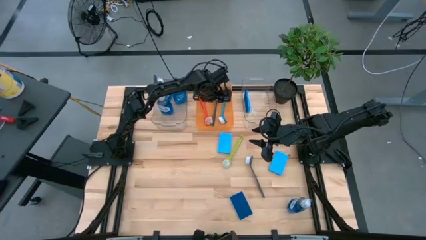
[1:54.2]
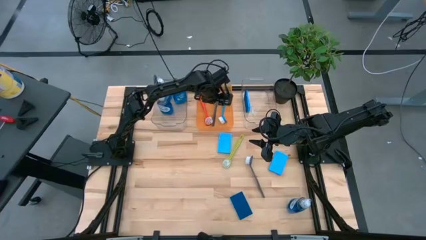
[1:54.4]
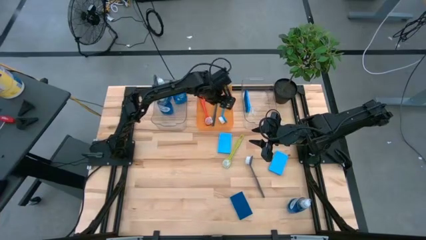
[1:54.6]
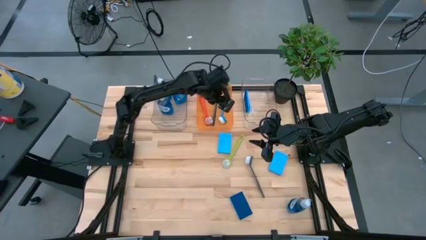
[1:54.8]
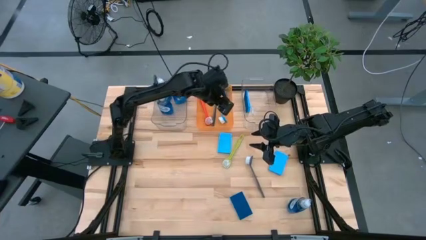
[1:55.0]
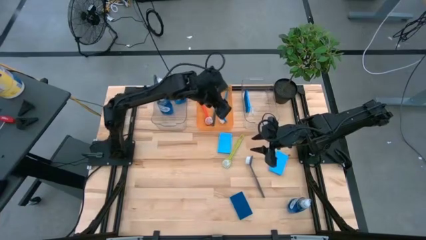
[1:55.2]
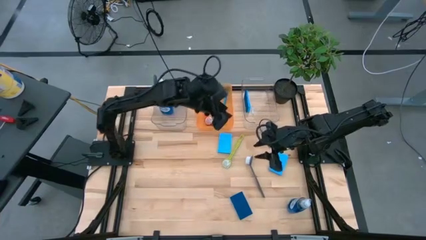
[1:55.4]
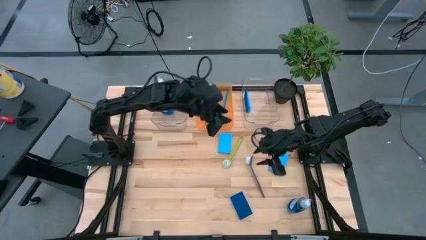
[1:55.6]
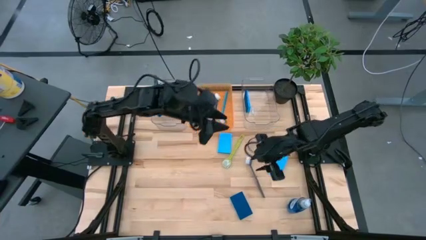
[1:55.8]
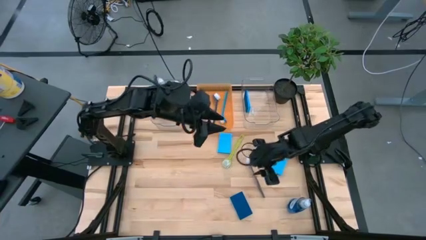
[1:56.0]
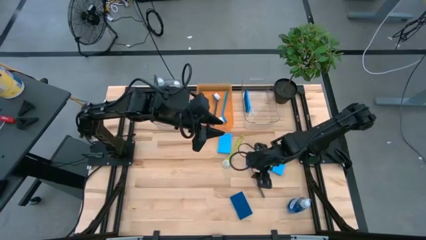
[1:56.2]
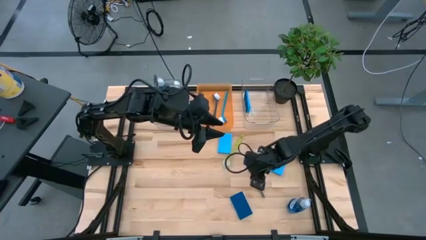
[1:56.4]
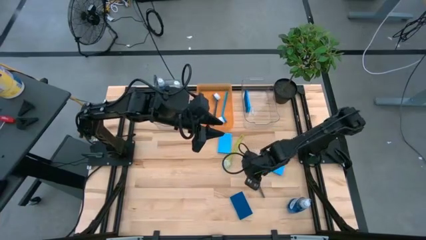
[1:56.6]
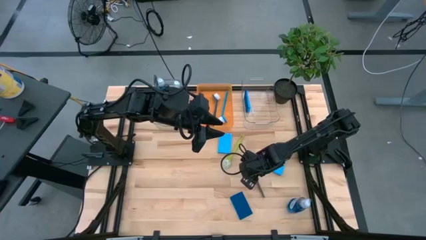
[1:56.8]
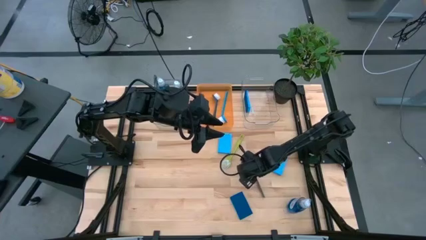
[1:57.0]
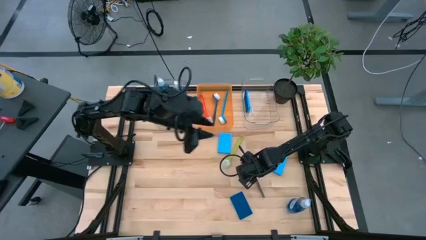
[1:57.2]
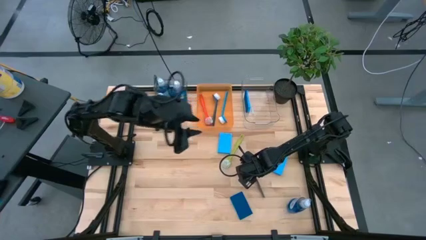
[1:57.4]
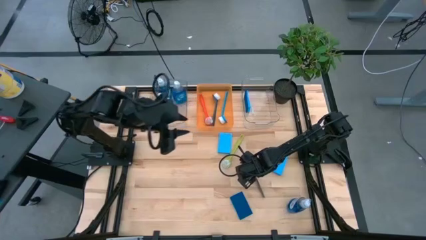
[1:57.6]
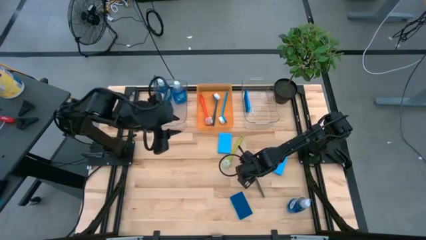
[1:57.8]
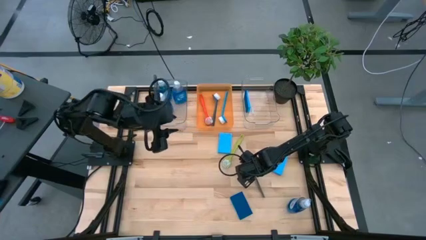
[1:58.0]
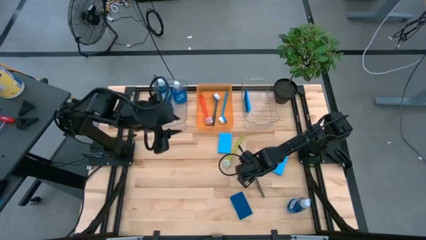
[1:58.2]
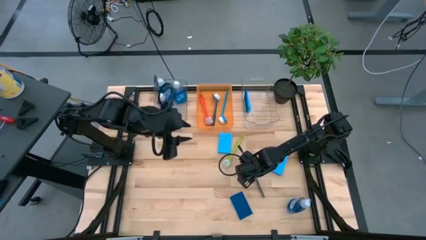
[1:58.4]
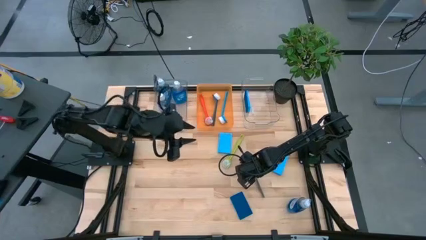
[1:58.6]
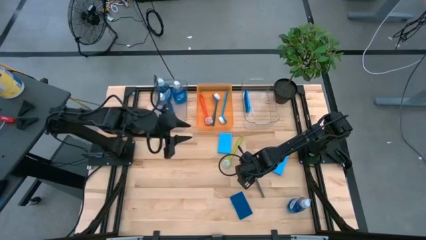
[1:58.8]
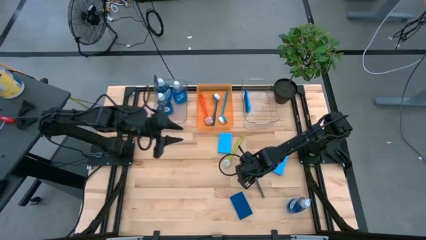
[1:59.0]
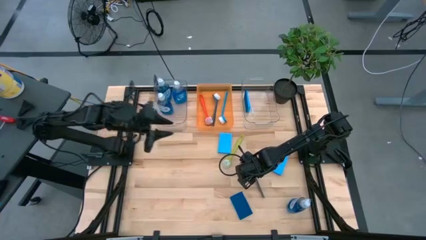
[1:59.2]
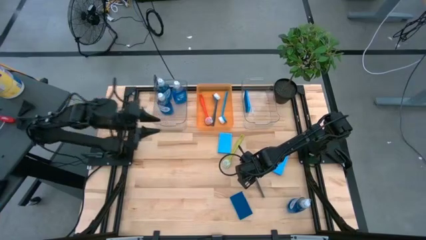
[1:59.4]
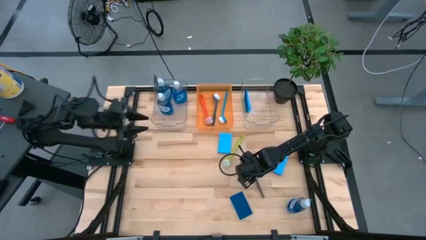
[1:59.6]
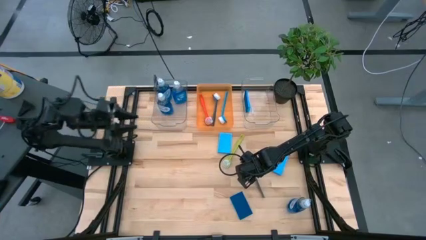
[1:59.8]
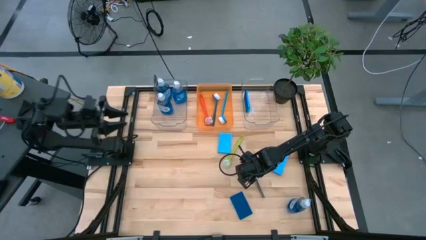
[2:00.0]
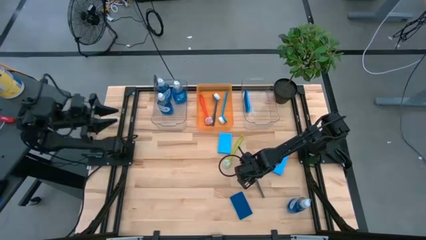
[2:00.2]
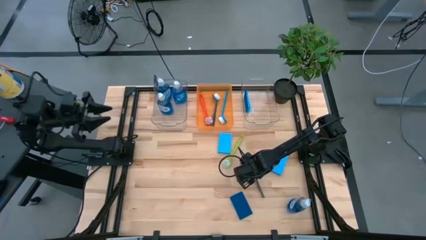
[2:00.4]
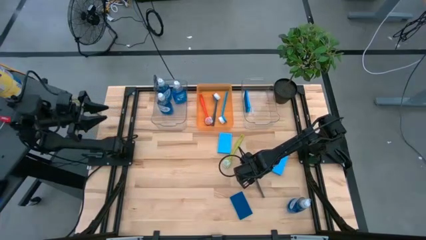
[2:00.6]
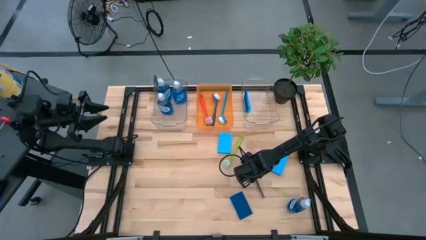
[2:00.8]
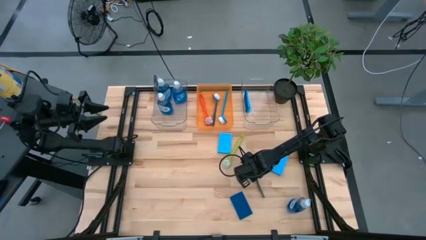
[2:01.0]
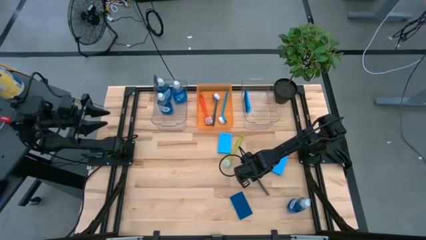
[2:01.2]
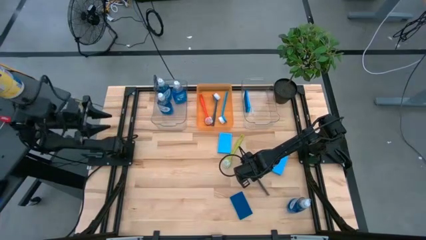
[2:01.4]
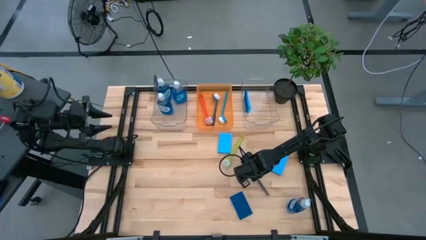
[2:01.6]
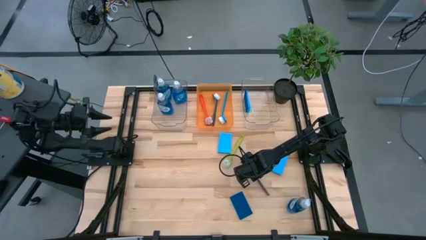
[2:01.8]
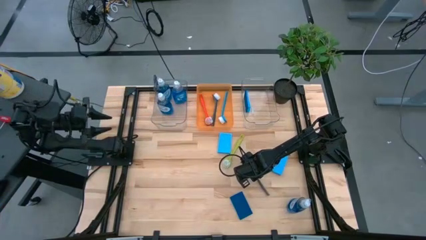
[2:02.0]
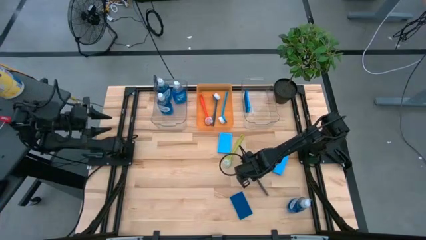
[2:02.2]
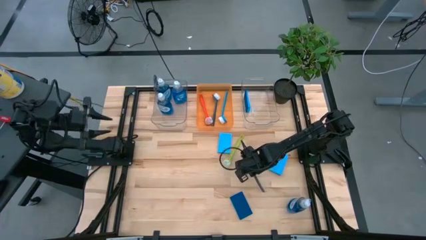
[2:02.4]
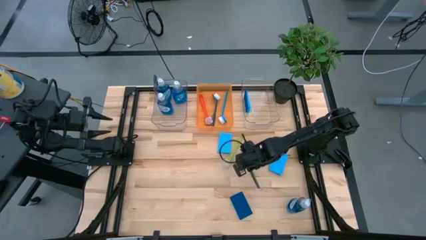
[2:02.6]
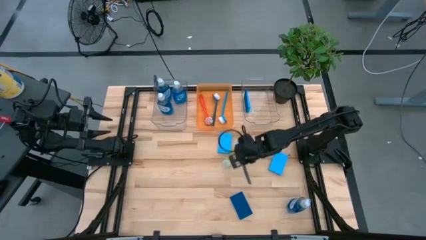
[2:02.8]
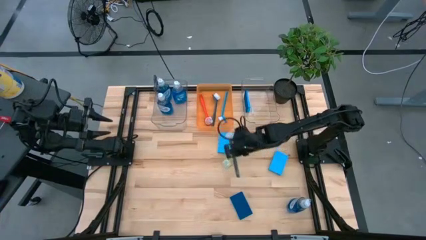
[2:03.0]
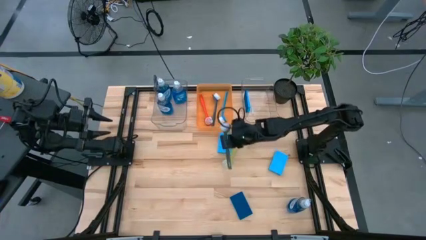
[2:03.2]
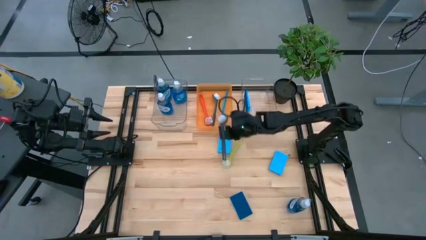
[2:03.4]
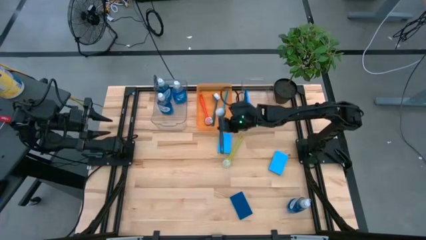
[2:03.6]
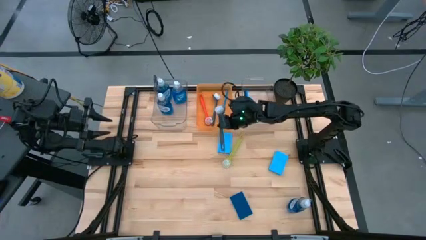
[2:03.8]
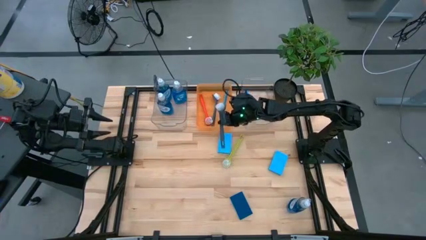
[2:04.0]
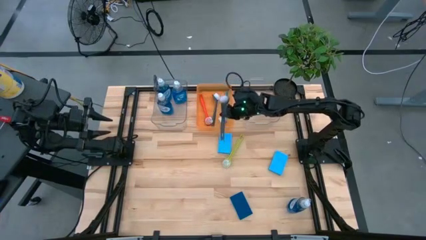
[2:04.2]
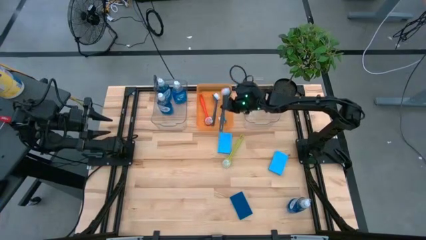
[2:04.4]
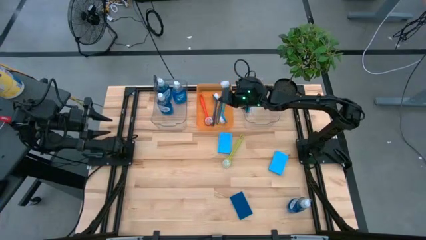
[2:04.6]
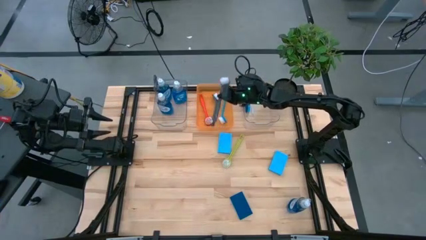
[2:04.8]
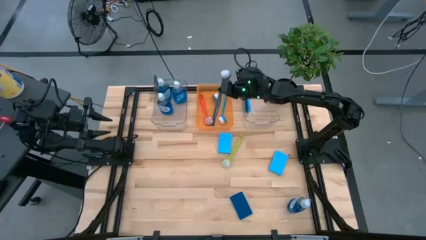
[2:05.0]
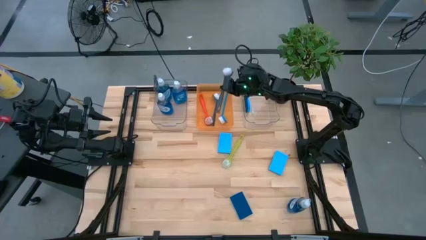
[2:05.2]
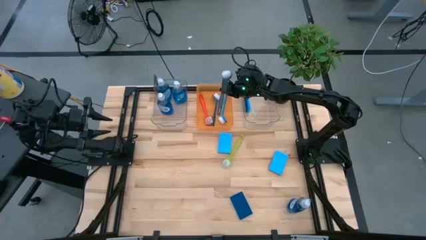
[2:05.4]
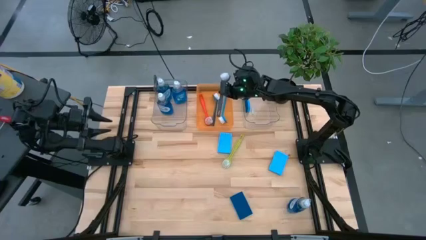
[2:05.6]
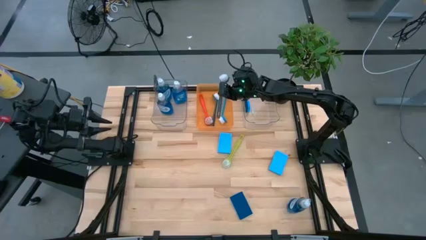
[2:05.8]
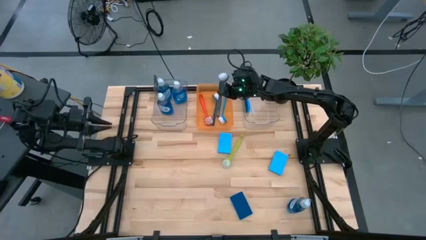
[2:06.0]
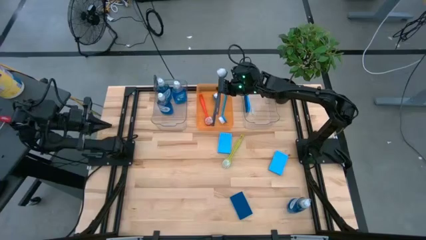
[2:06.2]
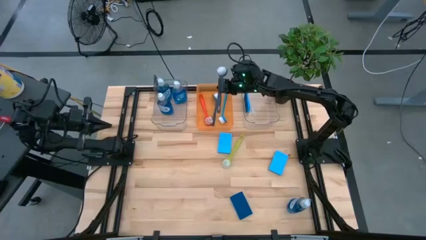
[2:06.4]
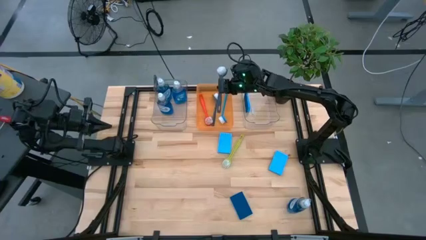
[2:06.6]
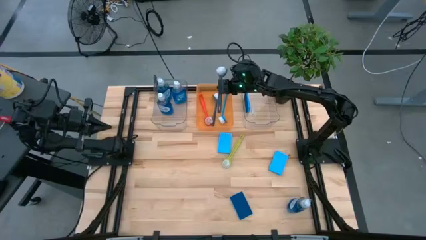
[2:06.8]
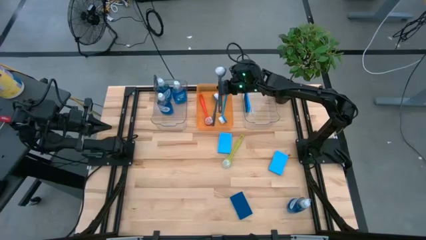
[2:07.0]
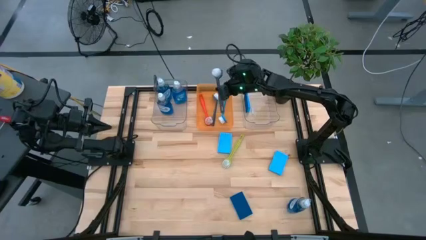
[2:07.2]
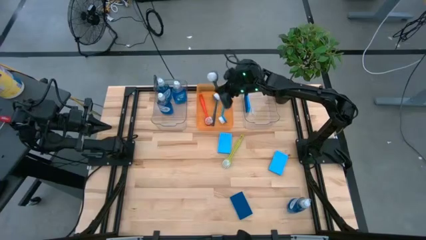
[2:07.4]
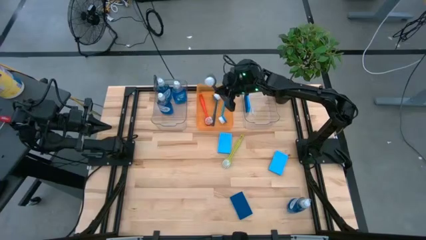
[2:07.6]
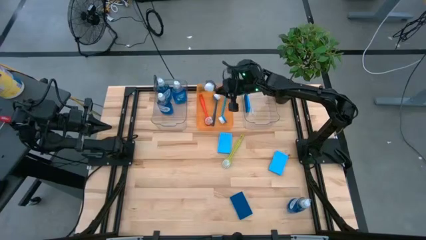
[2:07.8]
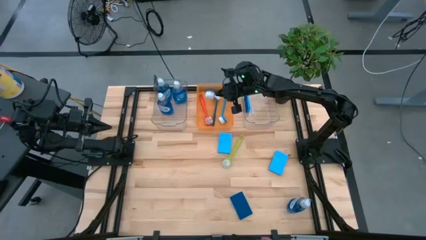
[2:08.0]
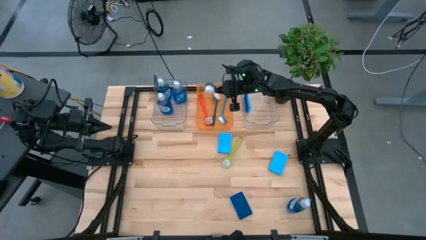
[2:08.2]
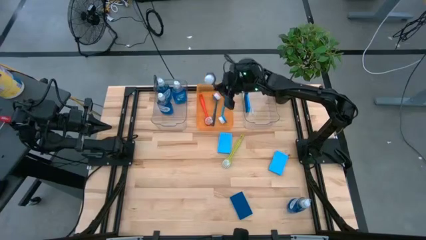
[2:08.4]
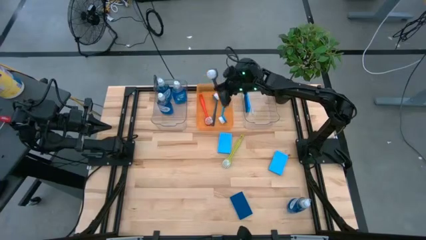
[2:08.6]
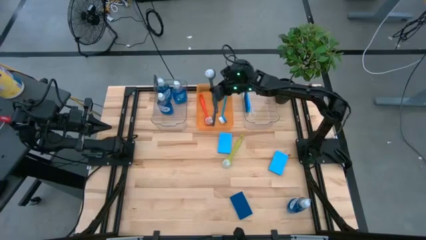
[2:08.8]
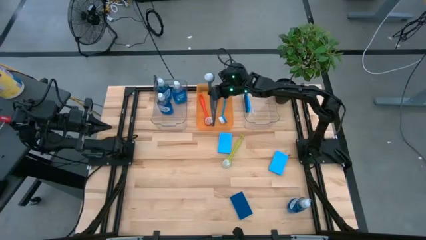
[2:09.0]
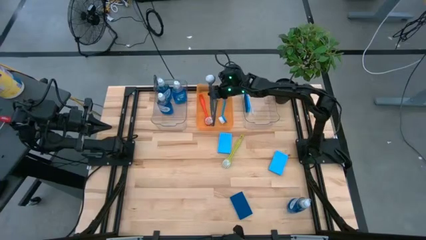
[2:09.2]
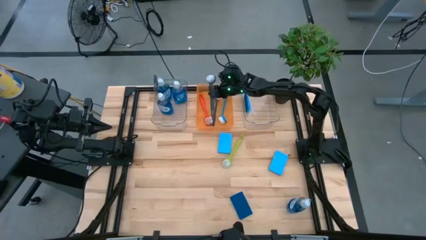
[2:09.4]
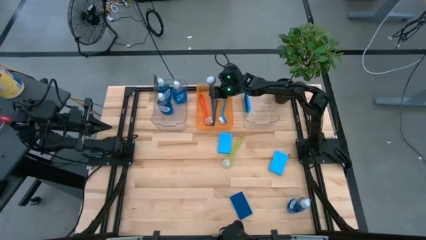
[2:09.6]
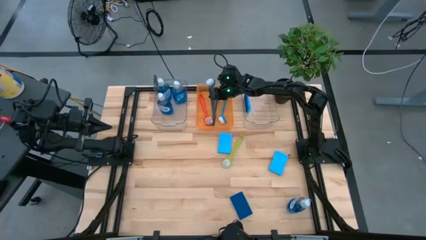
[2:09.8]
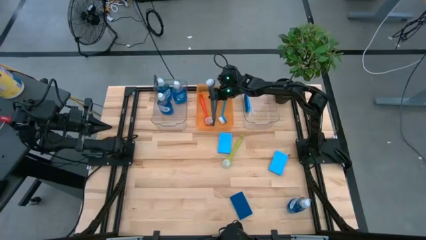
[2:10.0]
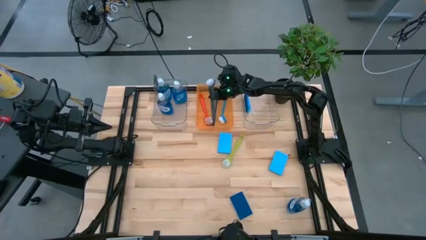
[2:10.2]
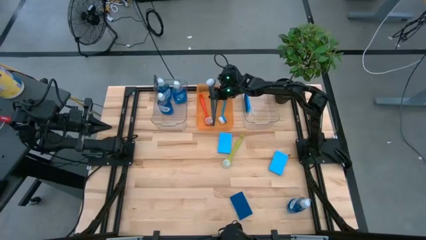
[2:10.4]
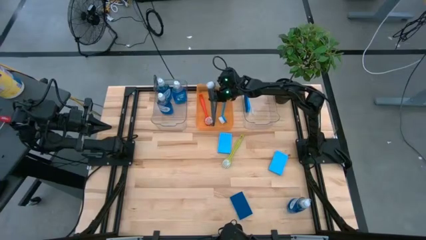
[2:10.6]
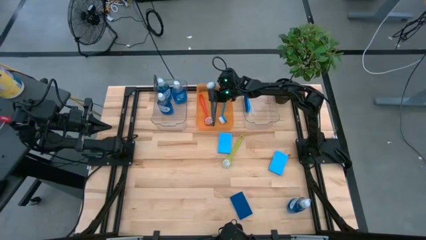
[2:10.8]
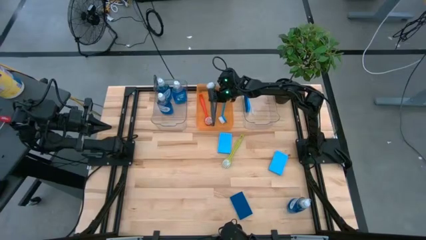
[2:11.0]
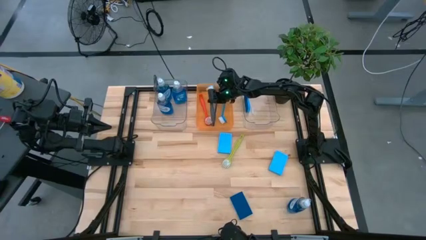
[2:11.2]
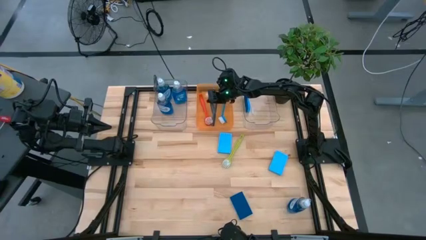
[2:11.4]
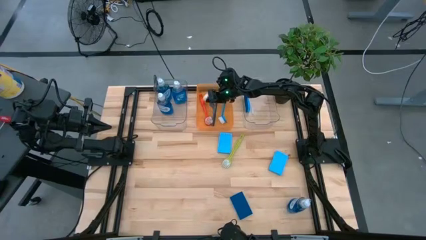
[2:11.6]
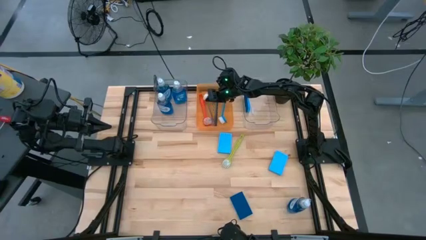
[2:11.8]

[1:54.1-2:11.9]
Task: Pick & Place Kitchen Sink Supplies
Put the gray dish brush into the orange bin
